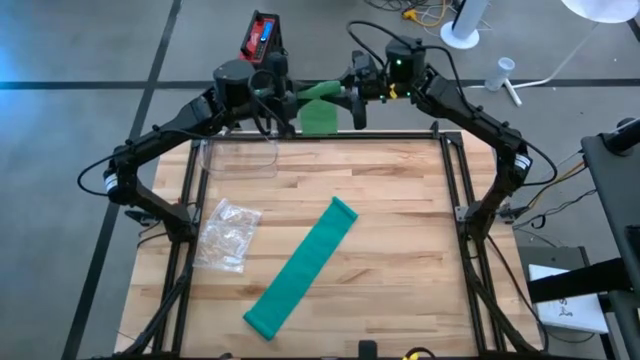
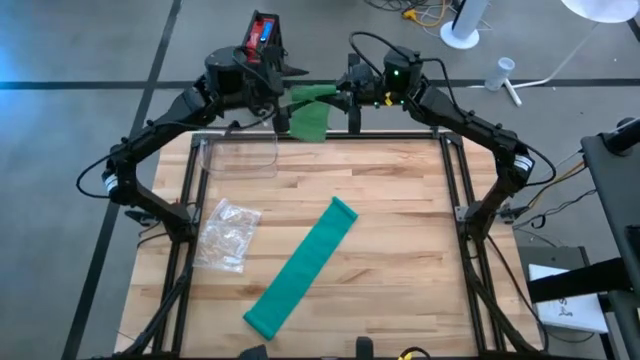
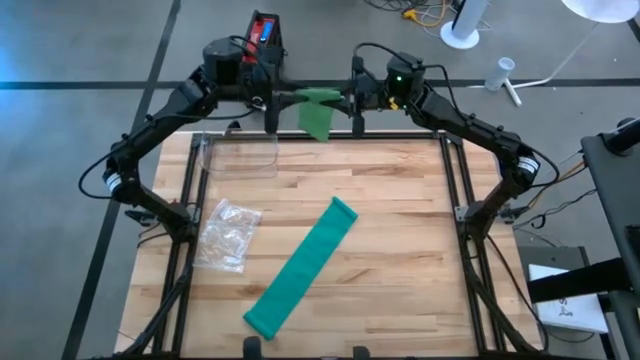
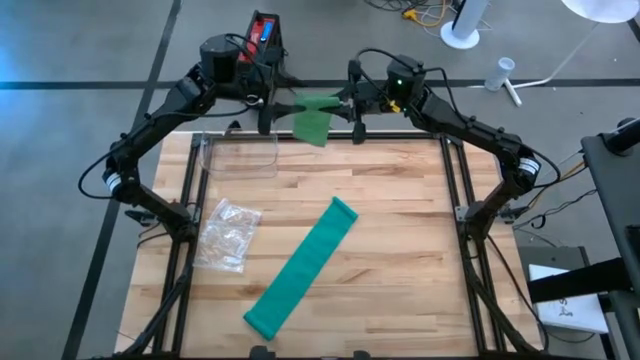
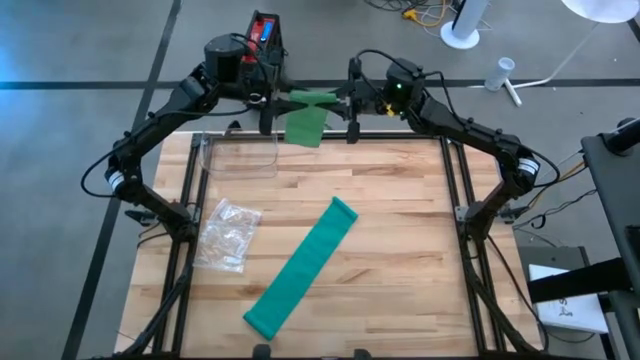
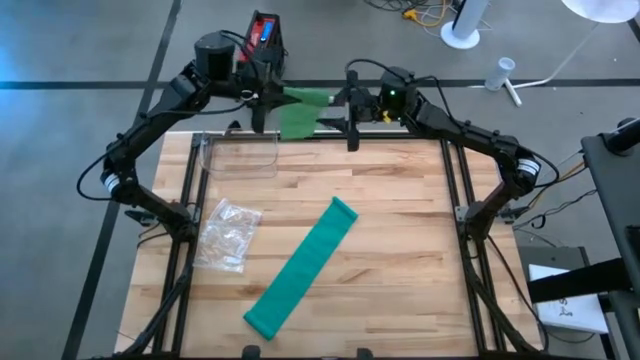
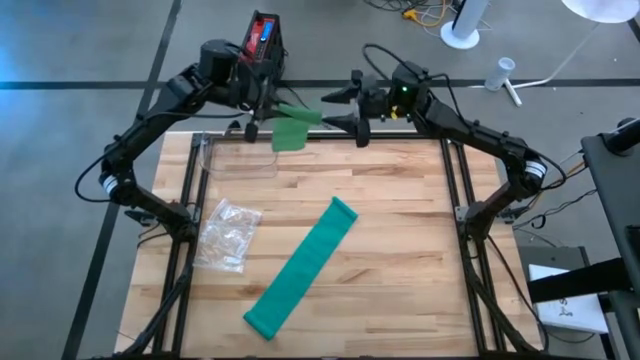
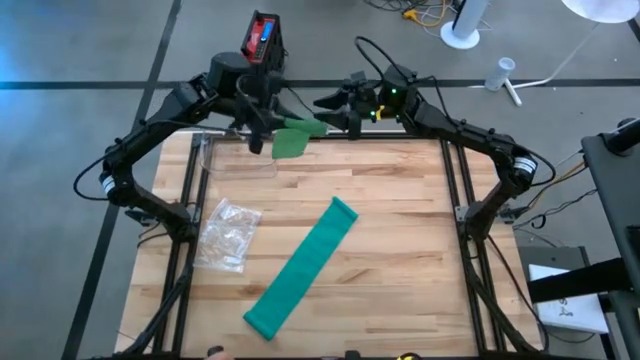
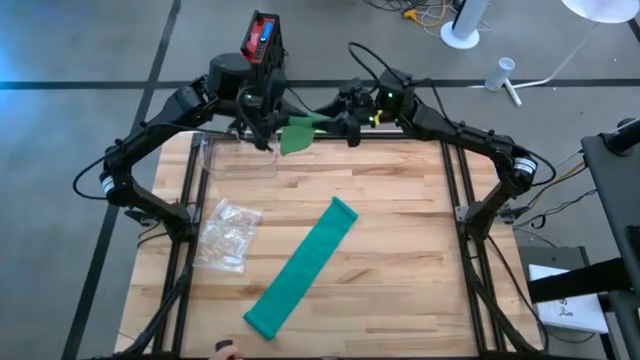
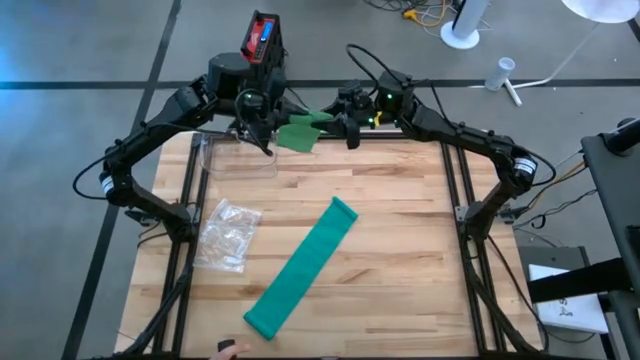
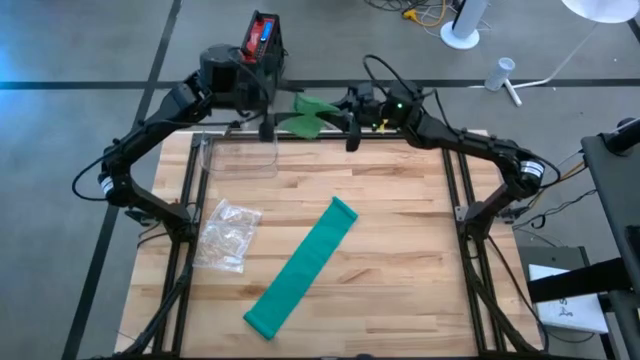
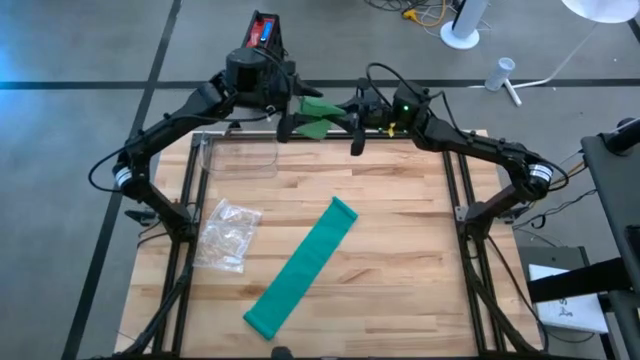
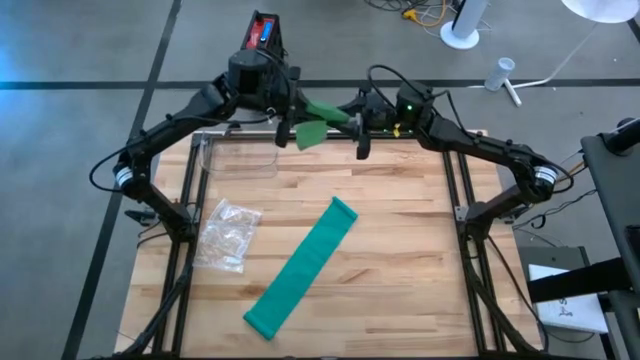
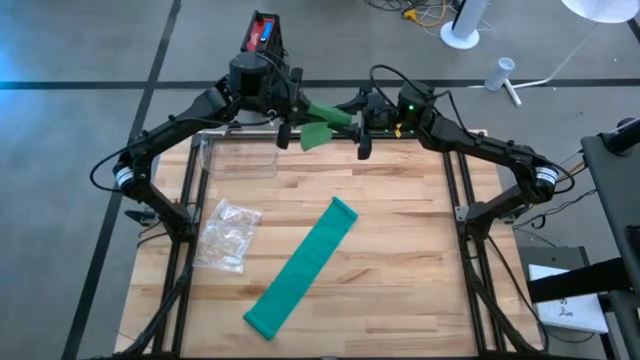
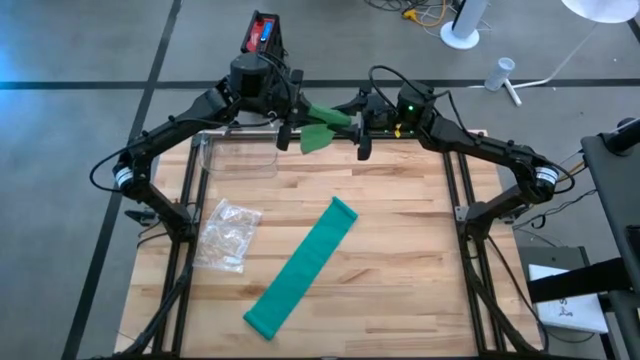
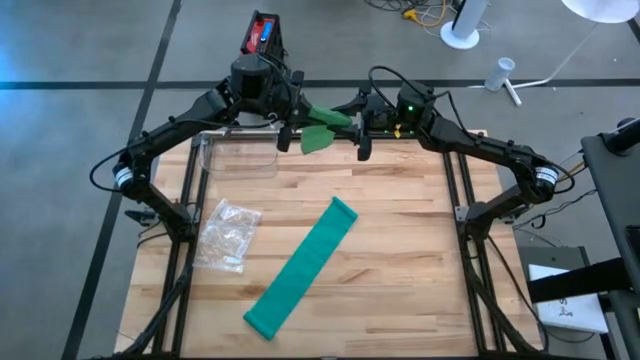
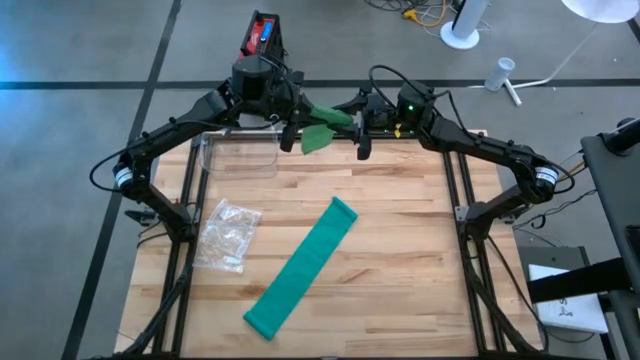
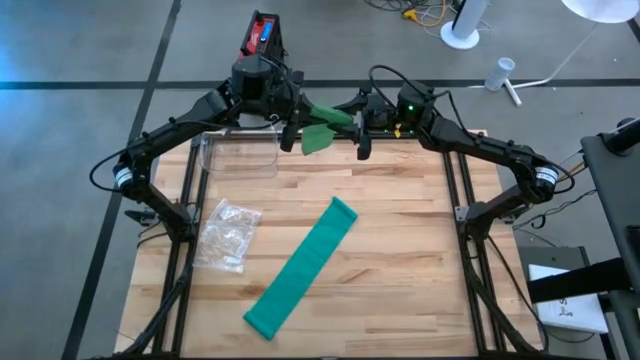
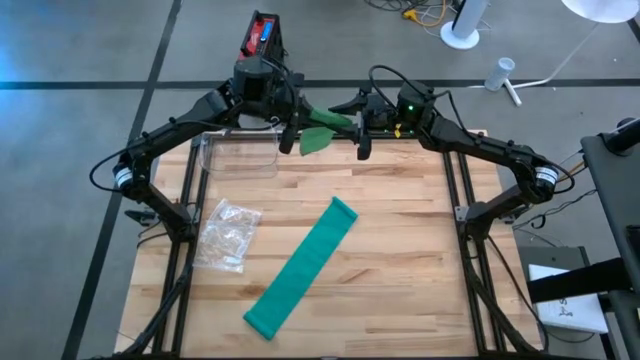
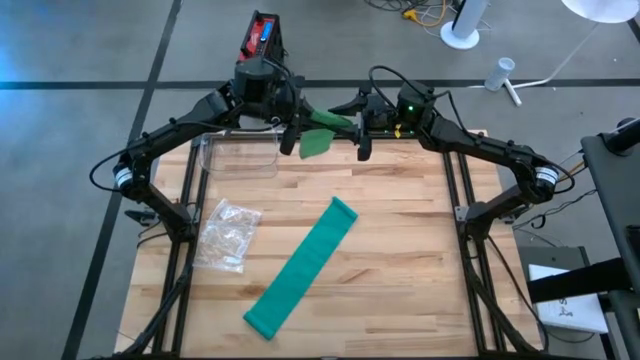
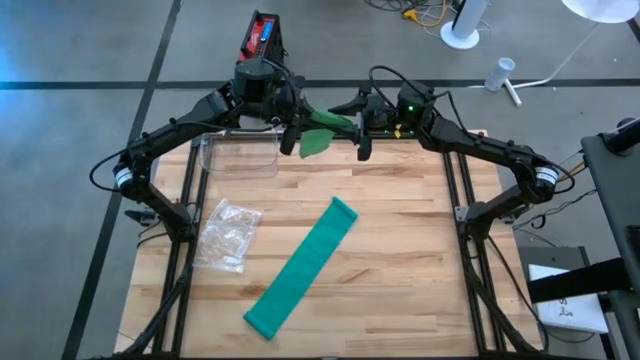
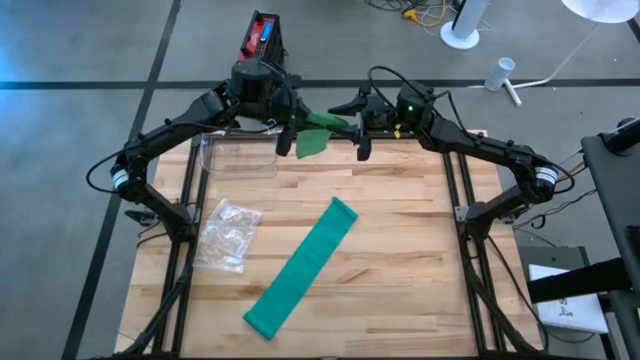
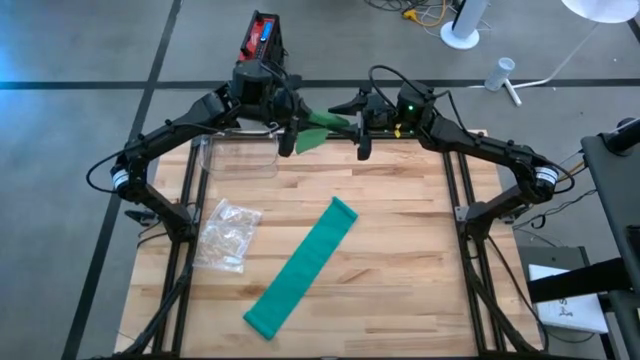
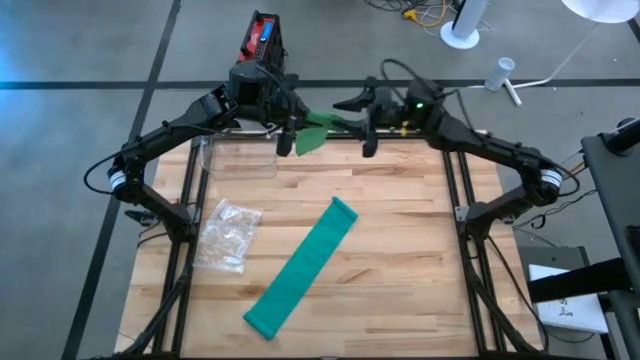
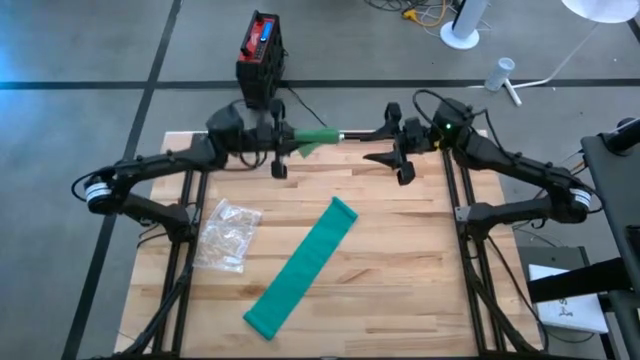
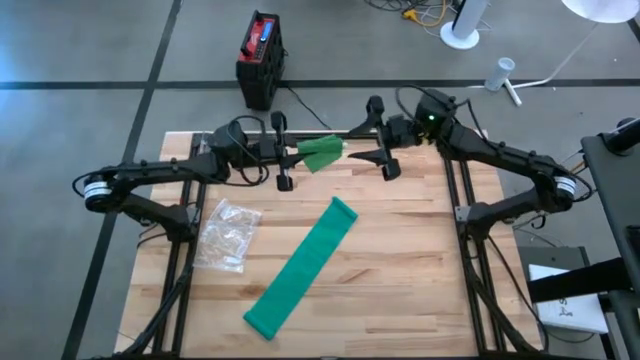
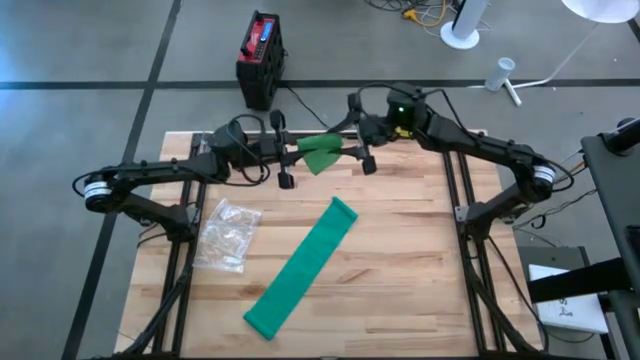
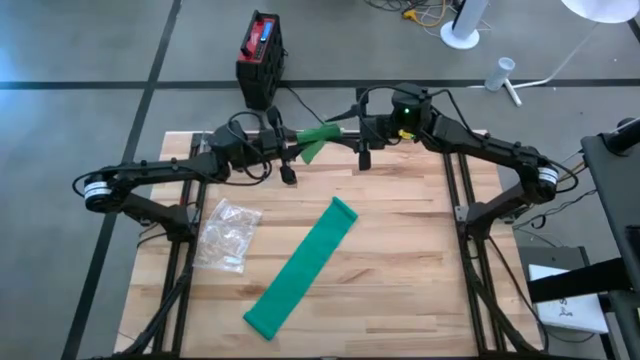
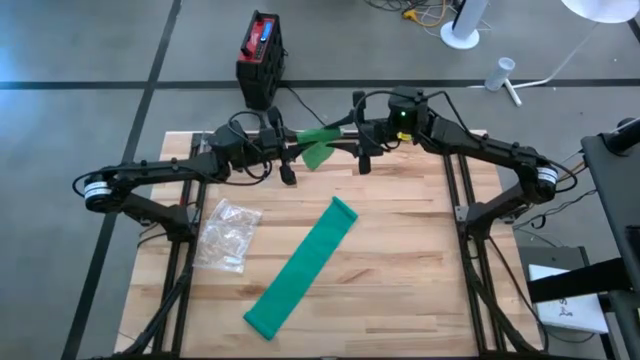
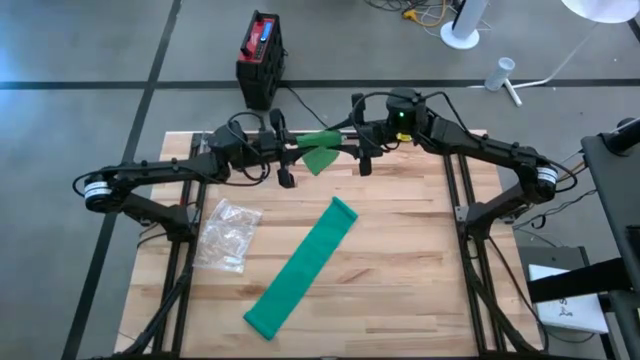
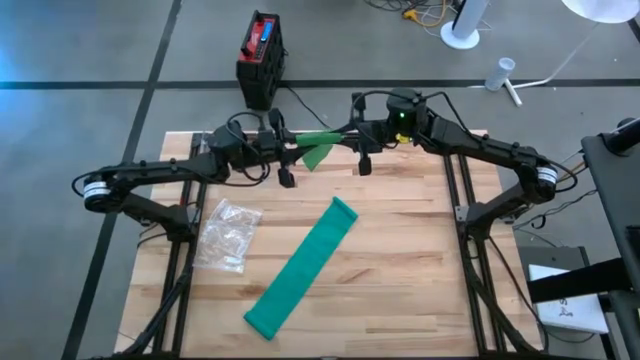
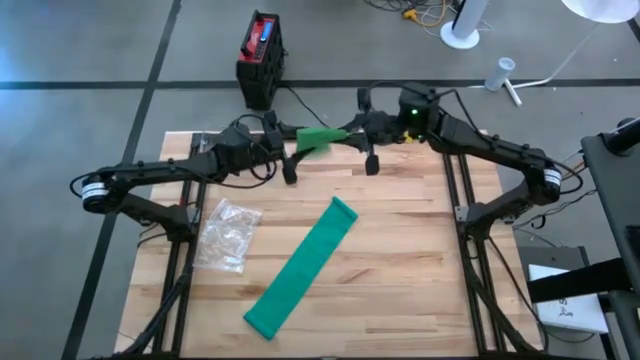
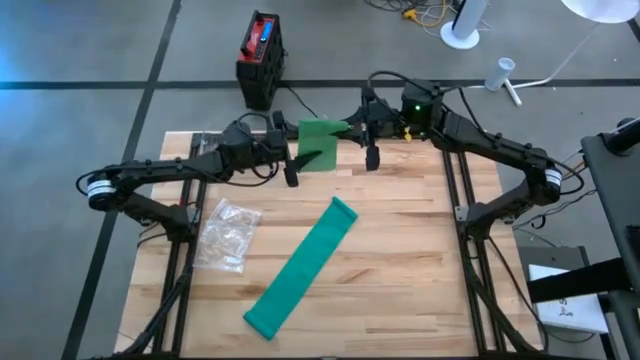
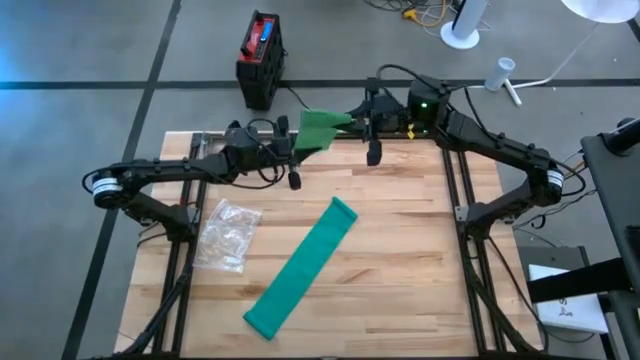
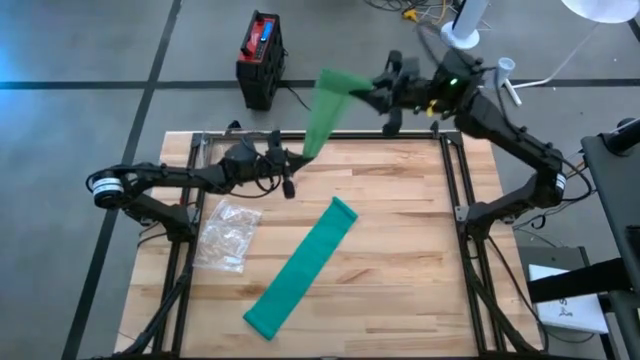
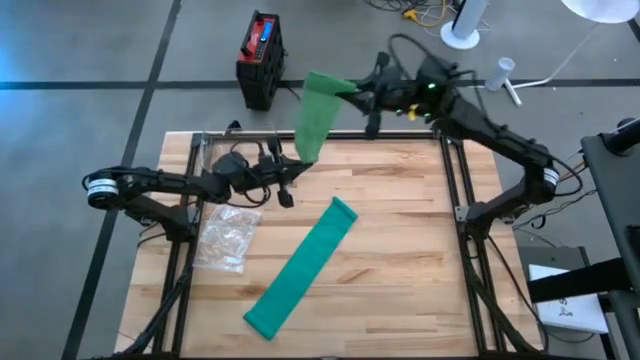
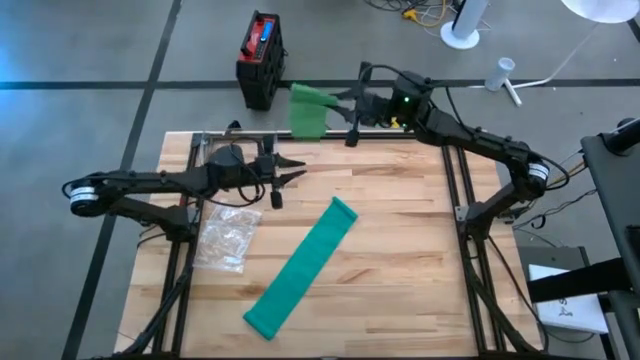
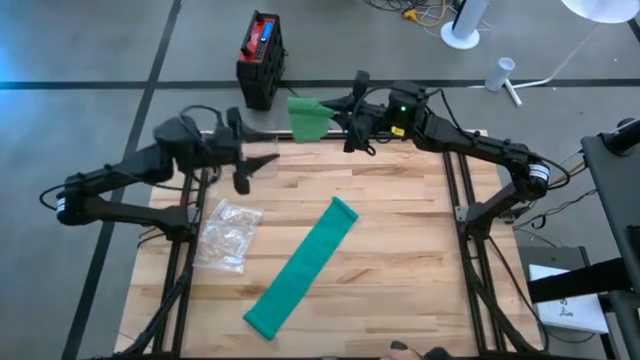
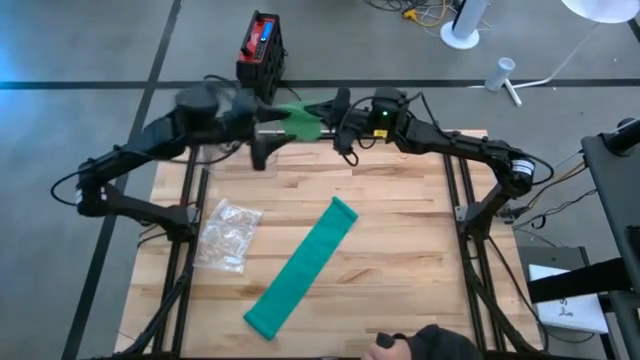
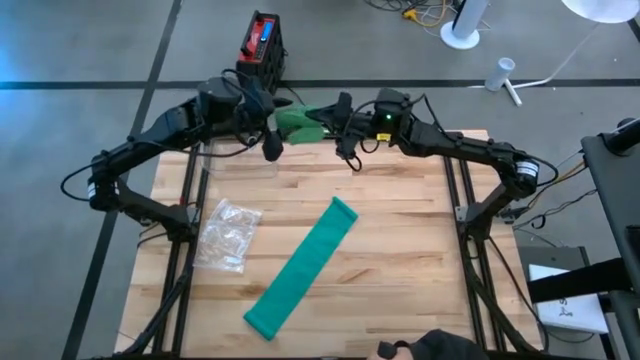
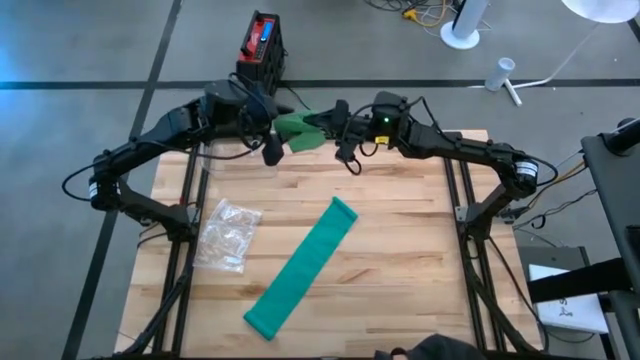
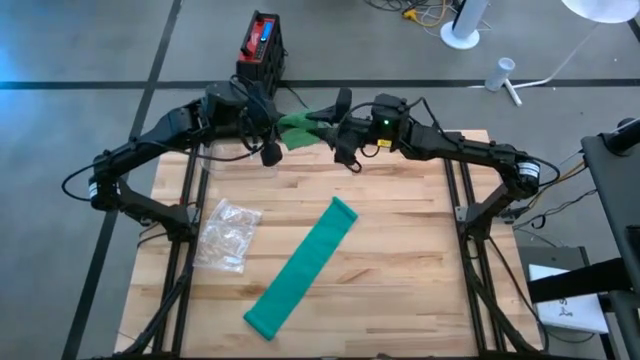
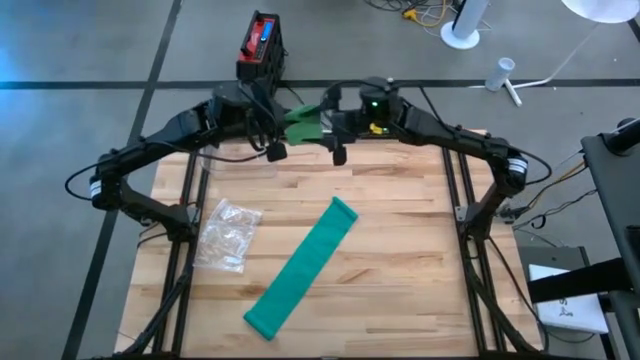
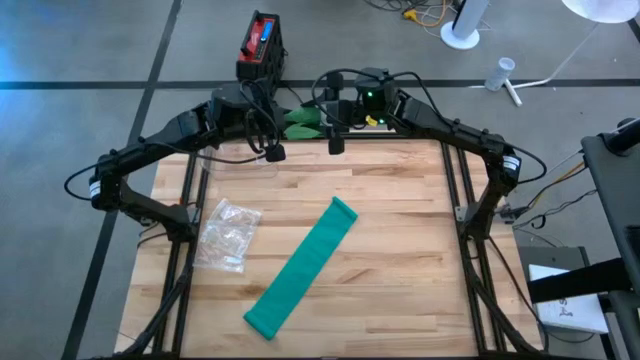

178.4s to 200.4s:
Task: Roll bandage
Roll the green bandage
